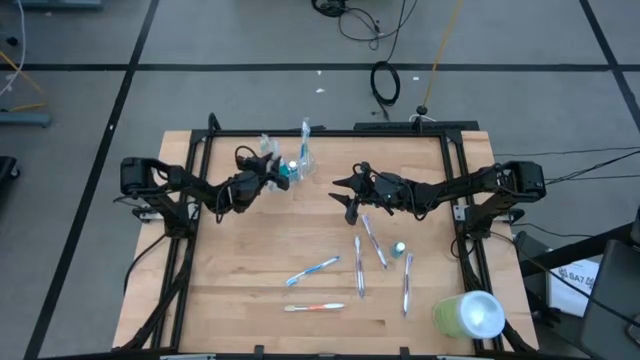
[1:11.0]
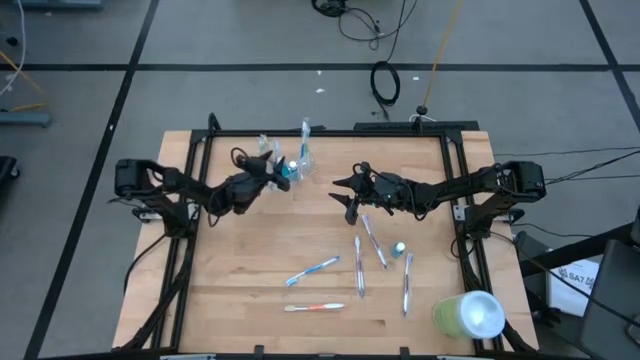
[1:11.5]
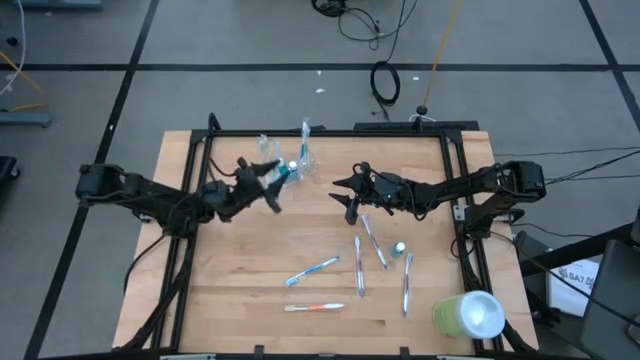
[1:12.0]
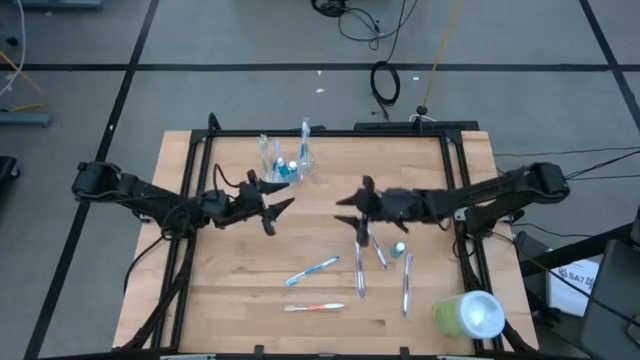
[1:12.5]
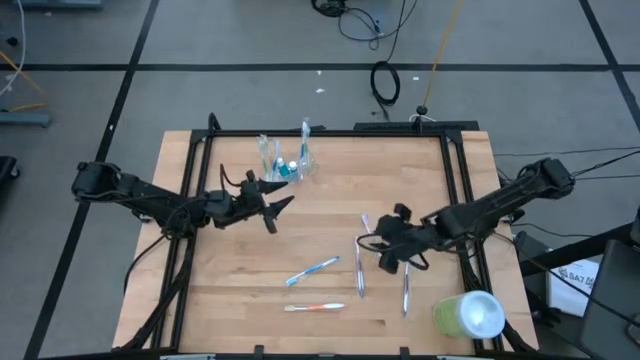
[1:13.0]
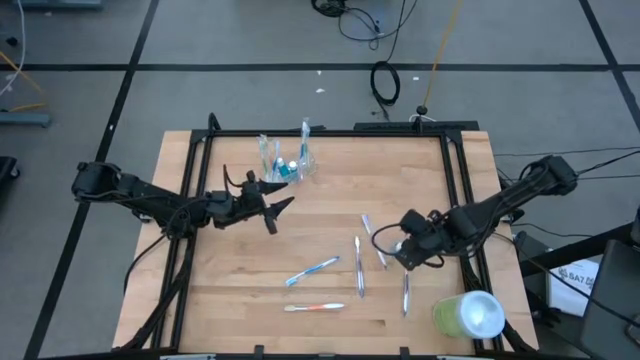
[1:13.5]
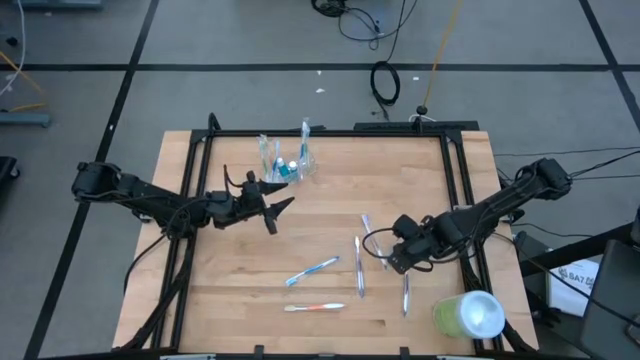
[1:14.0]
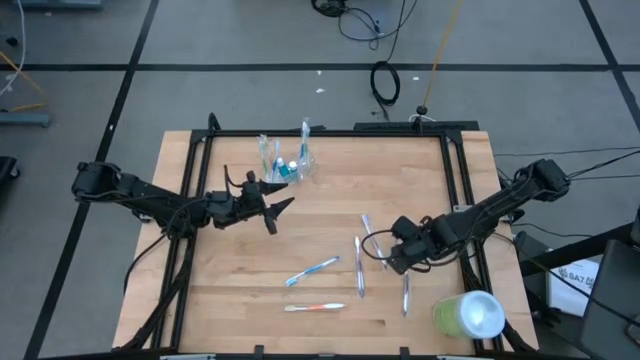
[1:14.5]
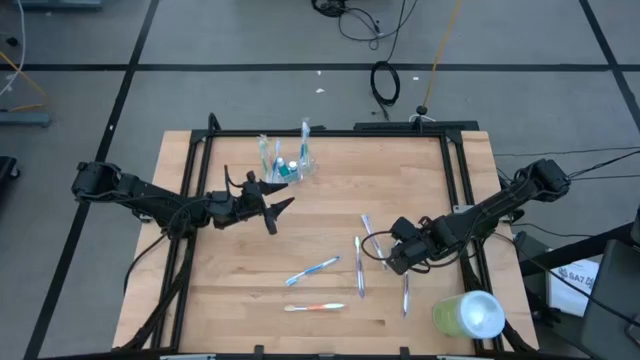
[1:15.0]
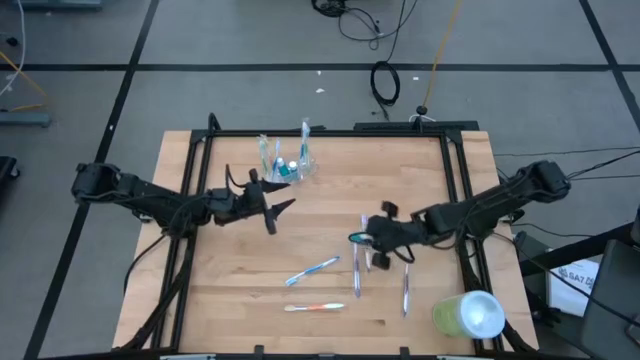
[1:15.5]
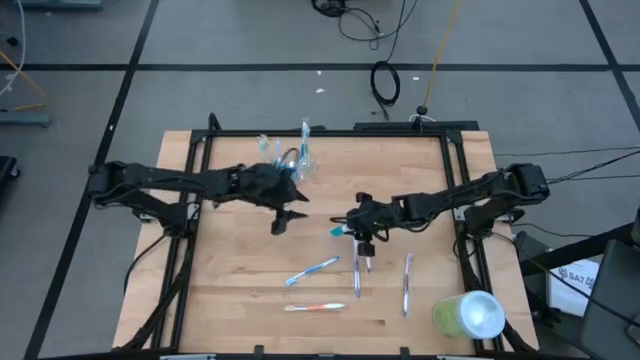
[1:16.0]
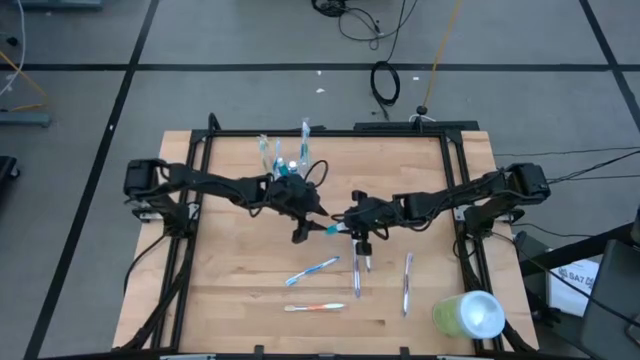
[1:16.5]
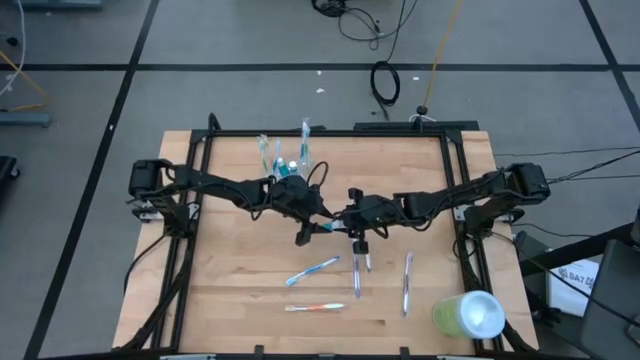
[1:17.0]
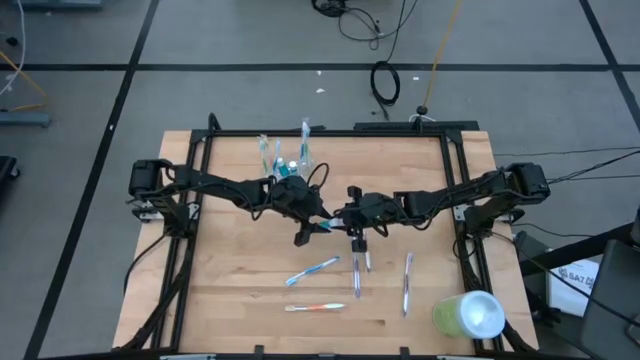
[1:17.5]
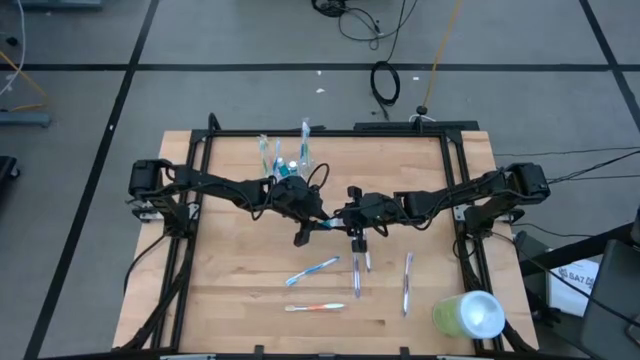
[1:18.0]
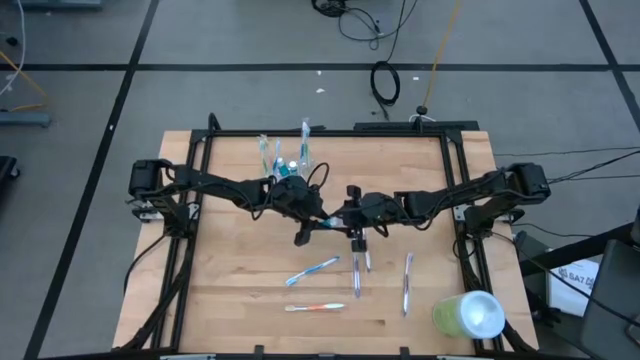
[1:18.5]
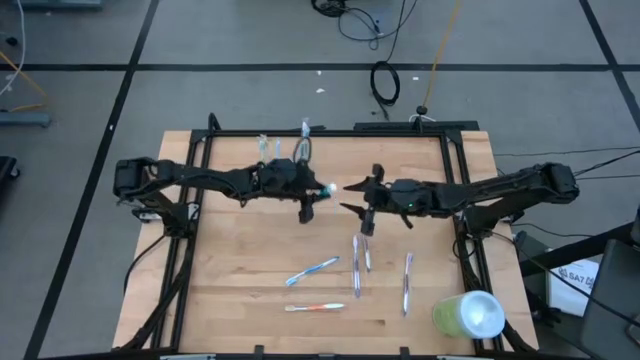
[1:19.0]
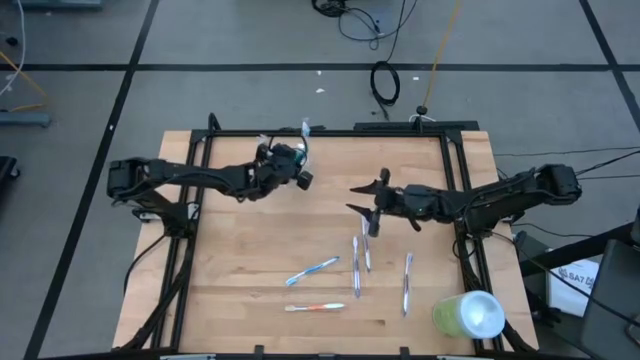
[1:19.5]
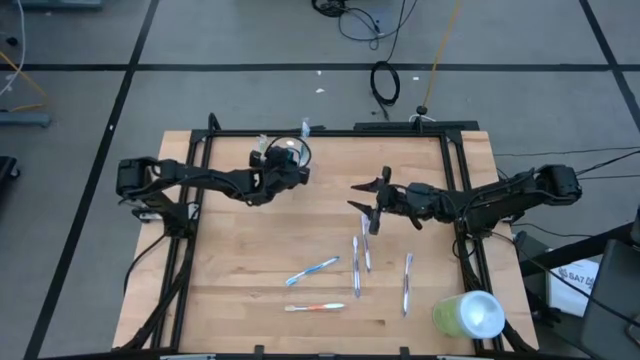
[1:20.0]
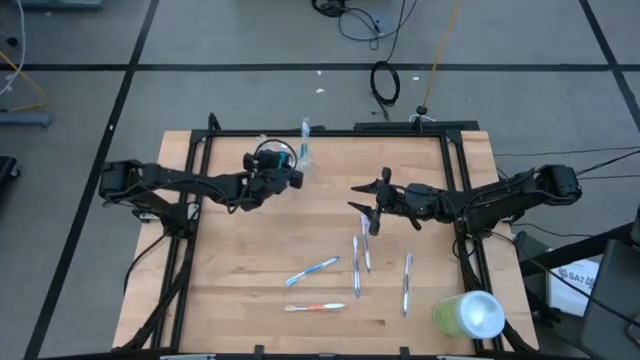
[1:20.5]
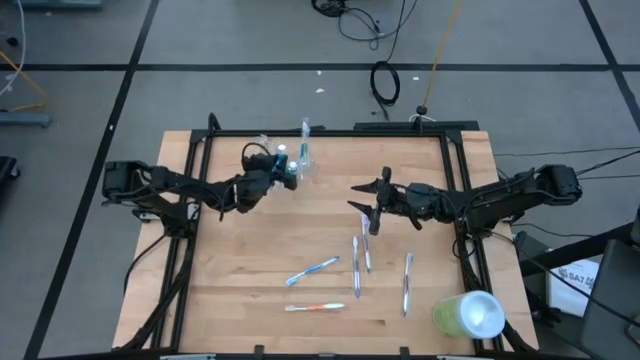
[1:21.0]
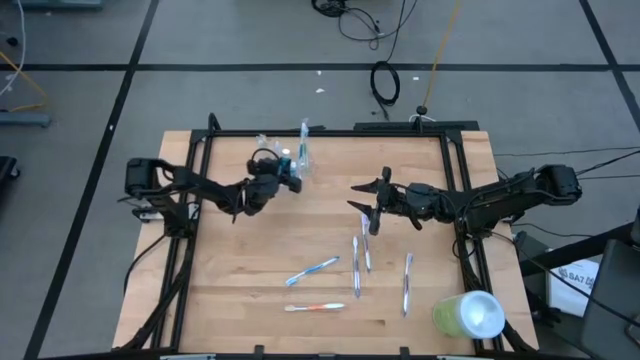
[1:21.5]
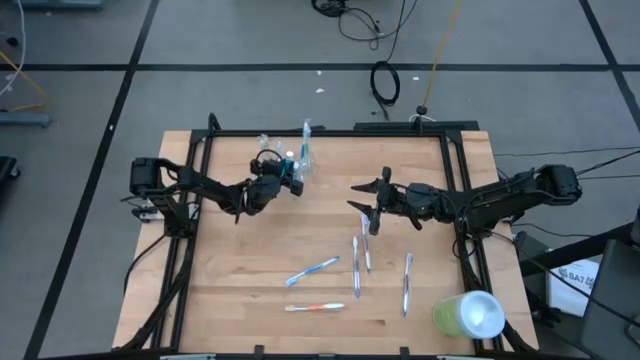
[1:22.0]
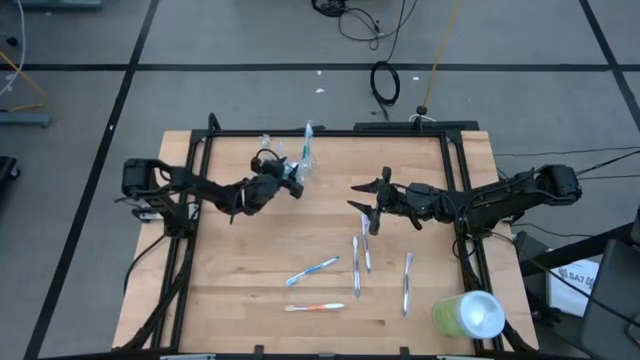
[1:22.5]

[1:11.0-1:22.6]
Task: Pick & Place toothbrushing station
Put the blue mouthwash into the transparent organizer

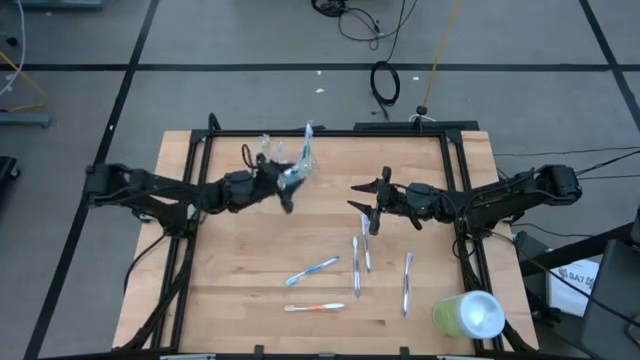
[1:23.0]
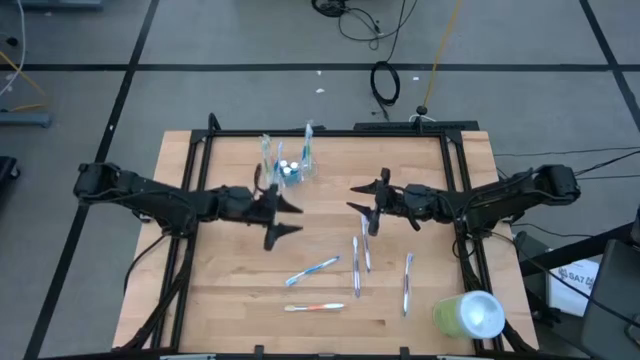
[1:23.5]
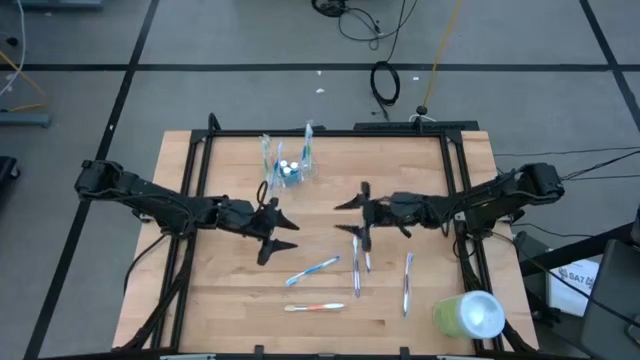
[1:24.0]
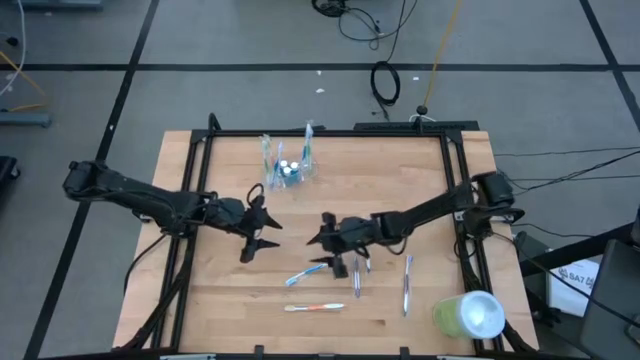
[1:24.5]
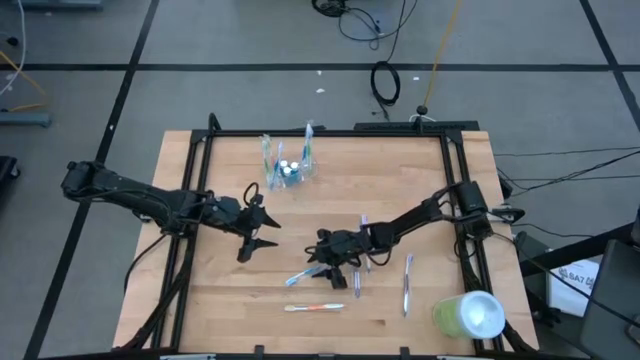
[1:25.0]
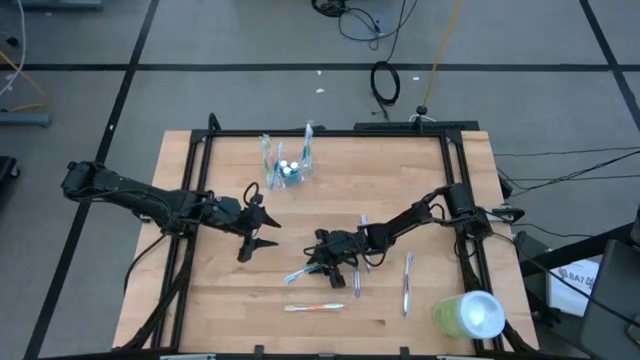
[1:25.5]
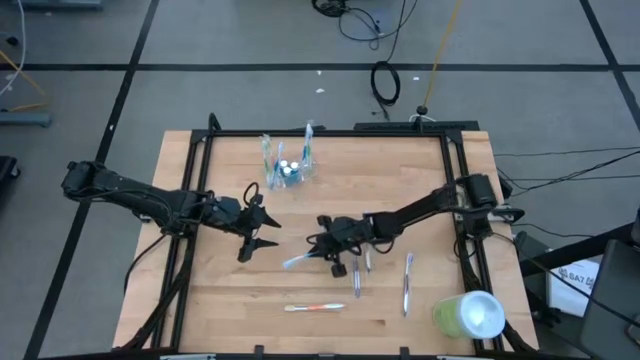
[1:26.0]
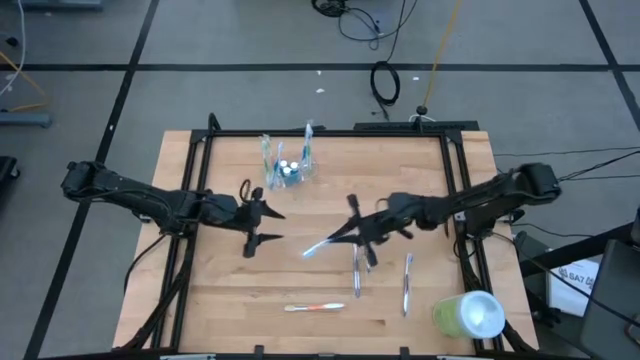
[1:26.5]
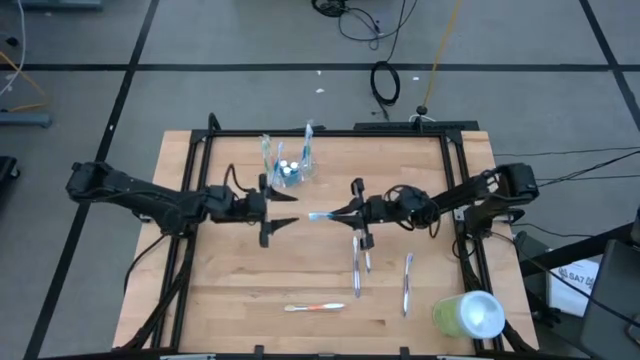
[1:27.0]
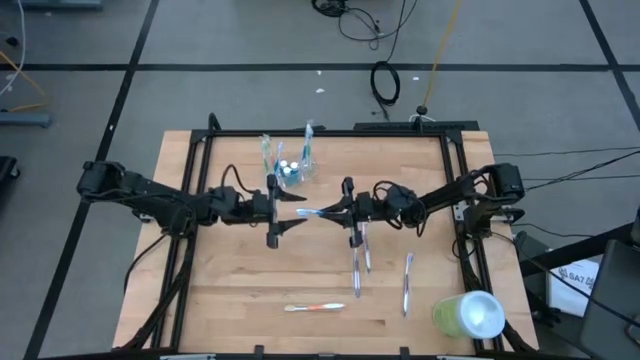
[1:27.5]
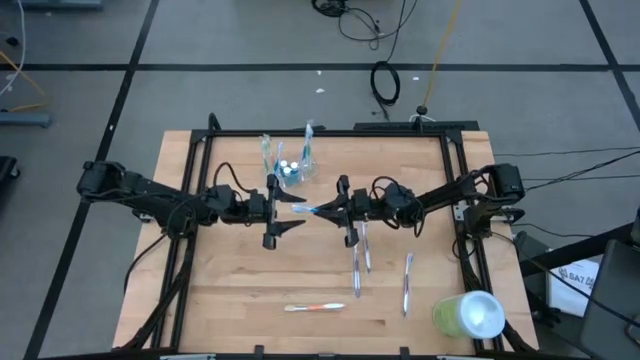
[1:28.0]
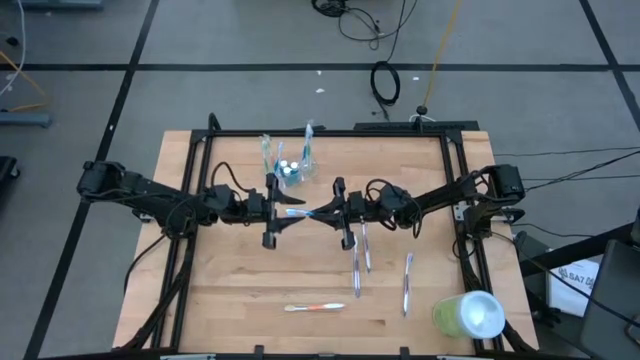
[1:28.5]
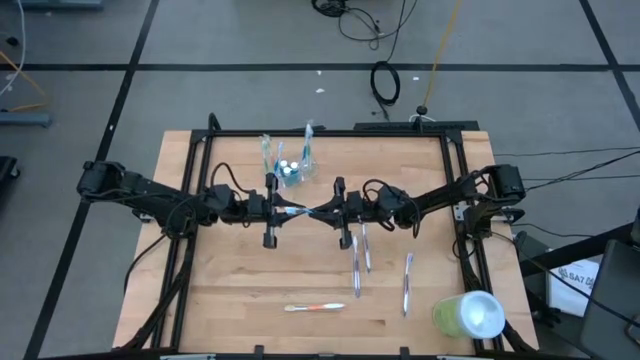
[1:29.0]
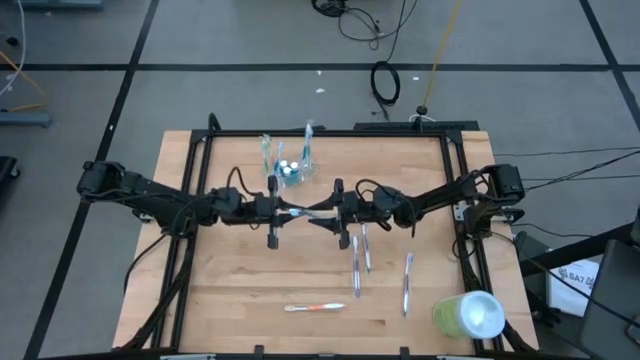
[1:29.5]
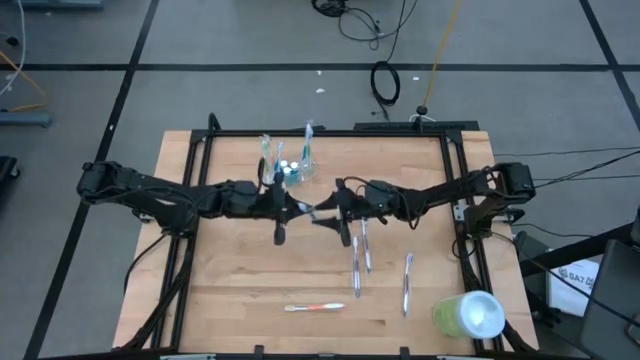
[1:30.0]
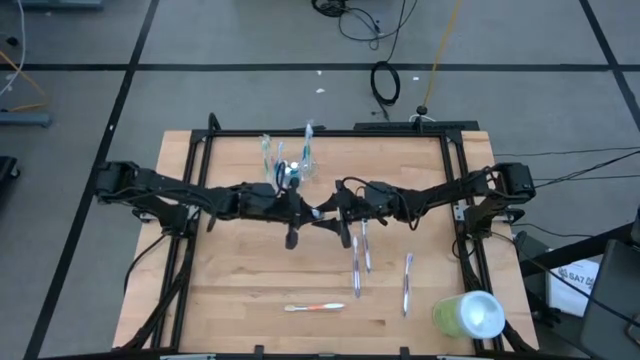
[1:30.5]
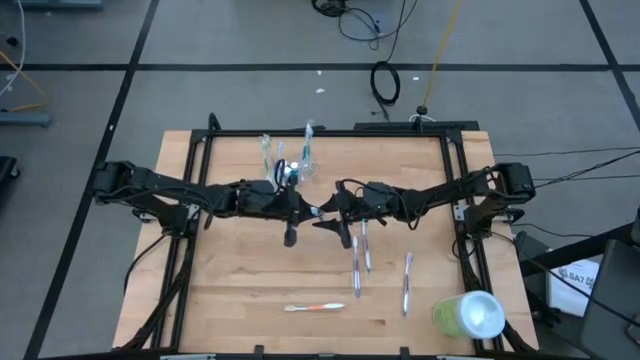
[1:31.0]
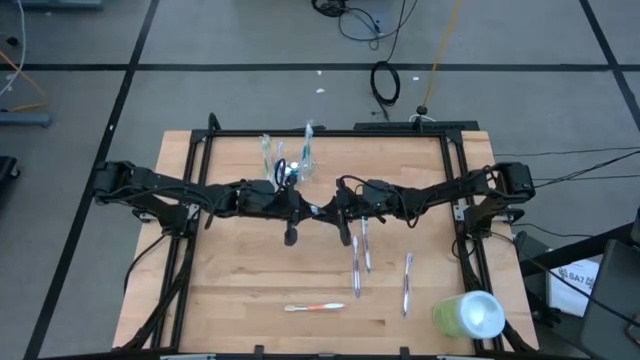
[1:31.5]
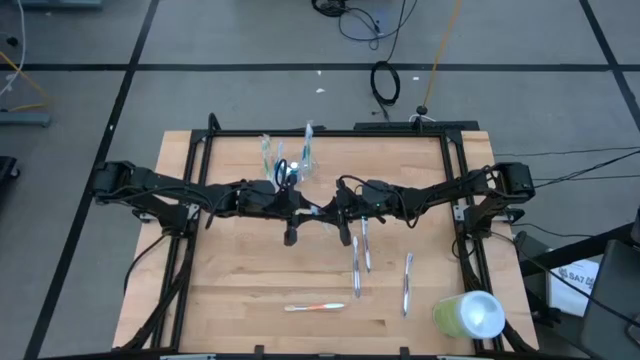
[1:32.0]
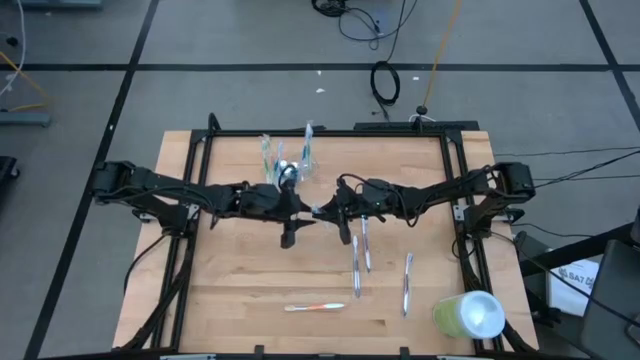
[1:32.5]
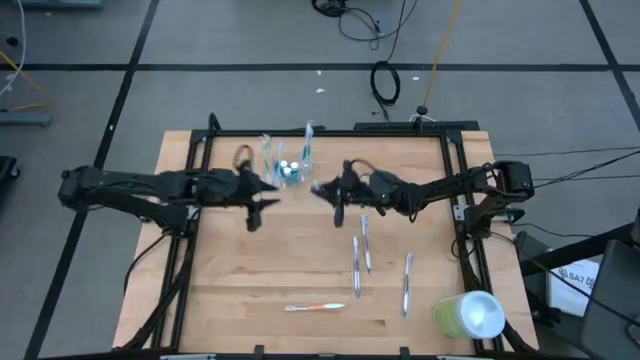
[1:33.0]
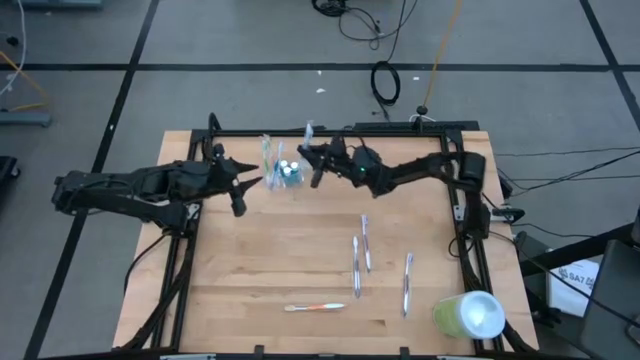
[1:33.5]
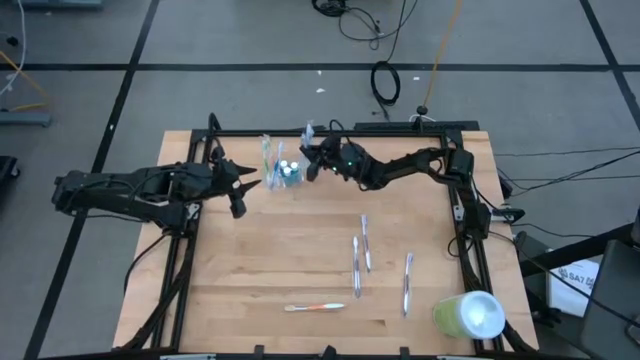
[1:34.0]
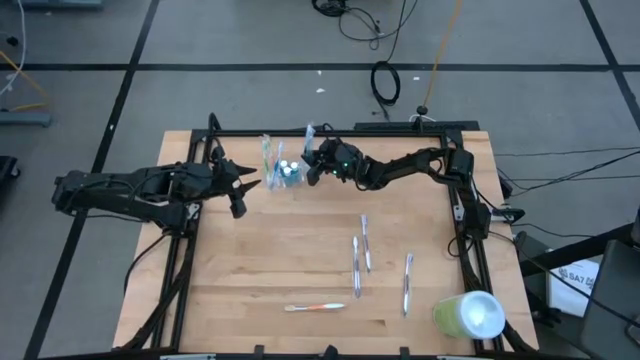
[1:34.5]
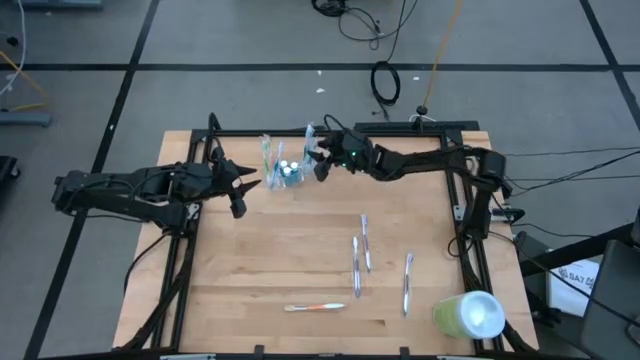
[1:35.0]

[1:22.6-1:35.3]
Put the blue toothbrush into the transparent organizer
